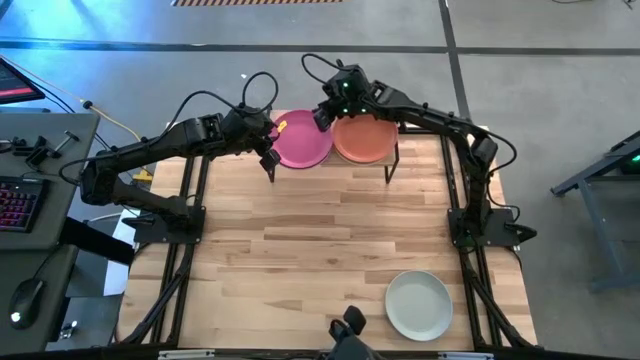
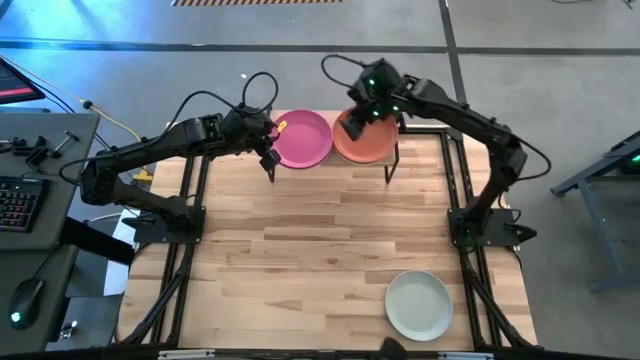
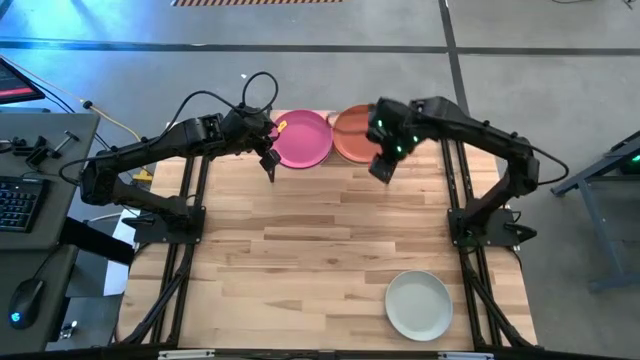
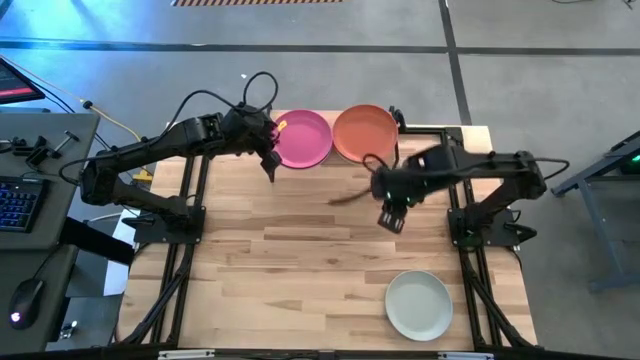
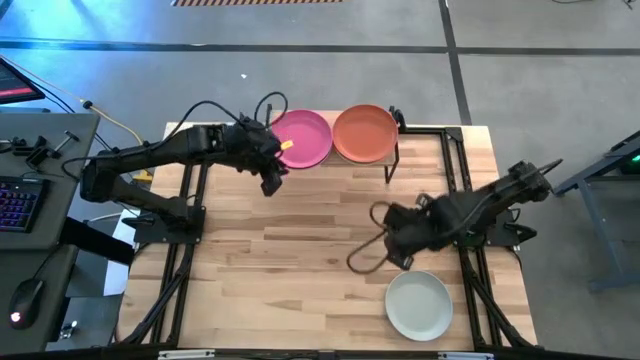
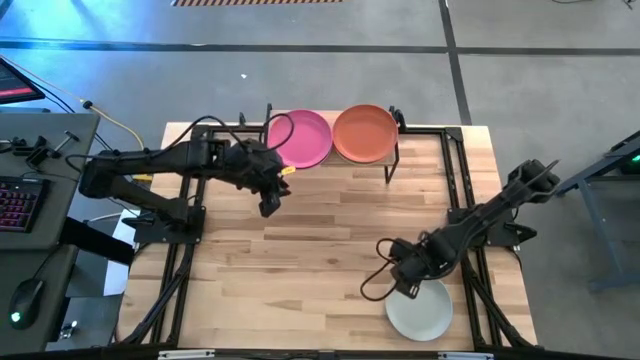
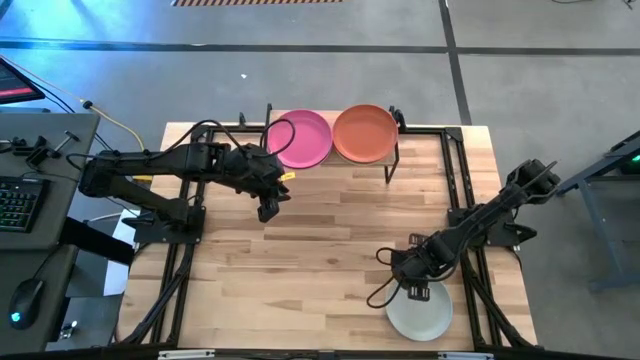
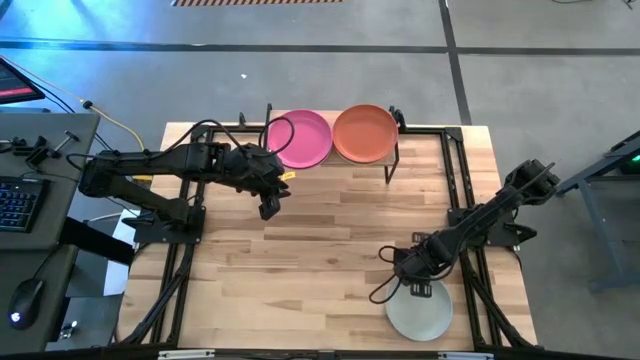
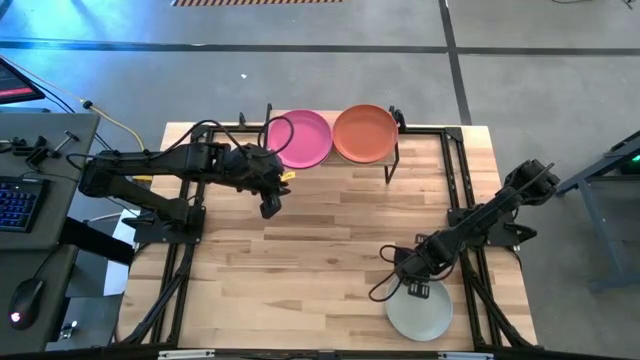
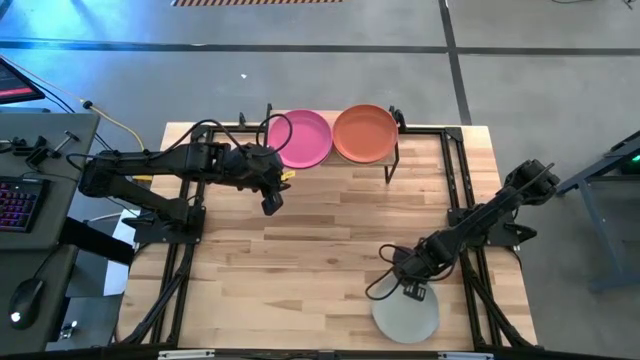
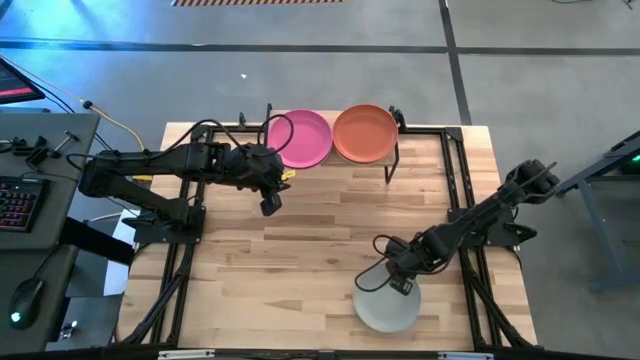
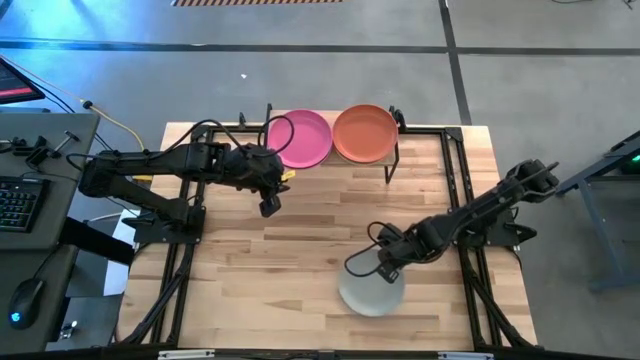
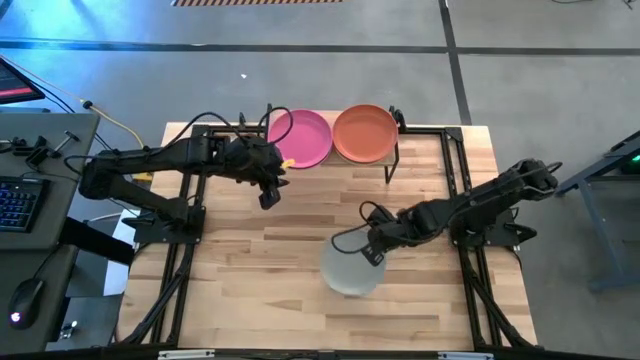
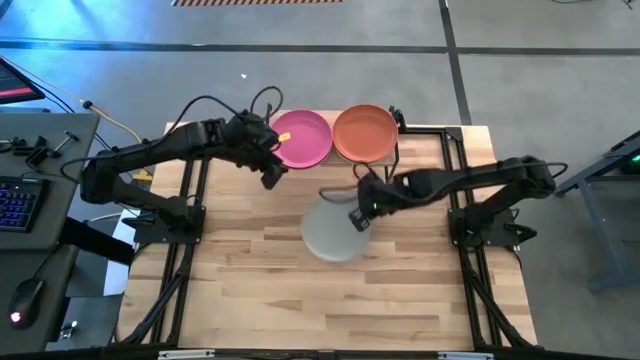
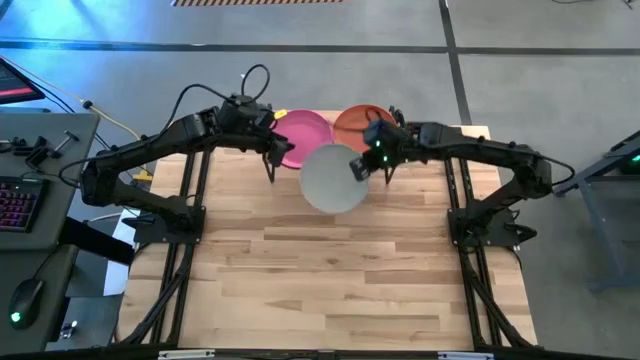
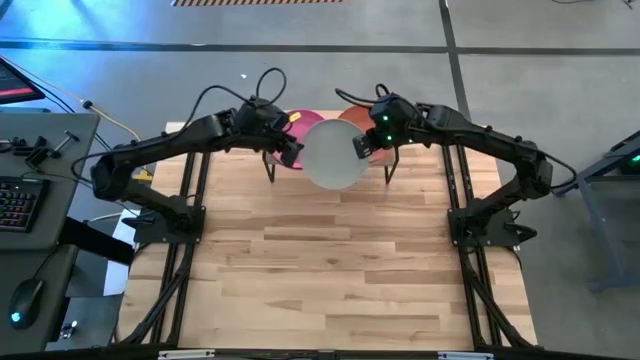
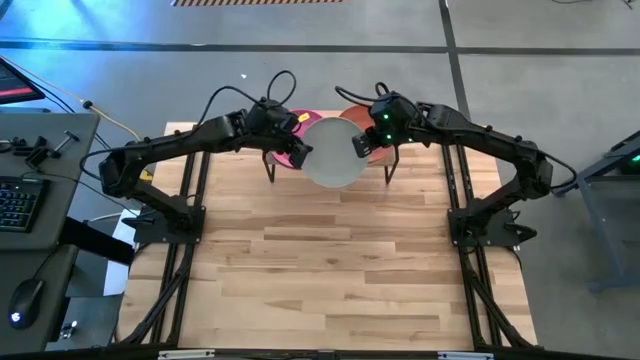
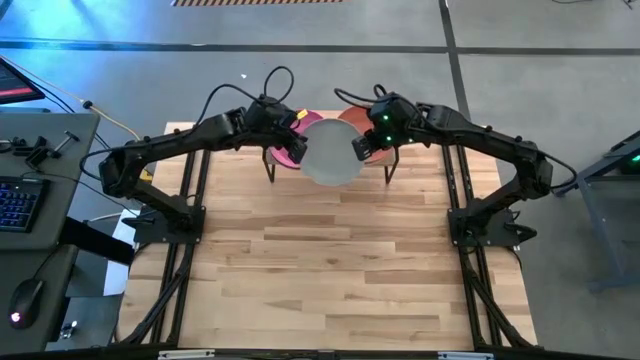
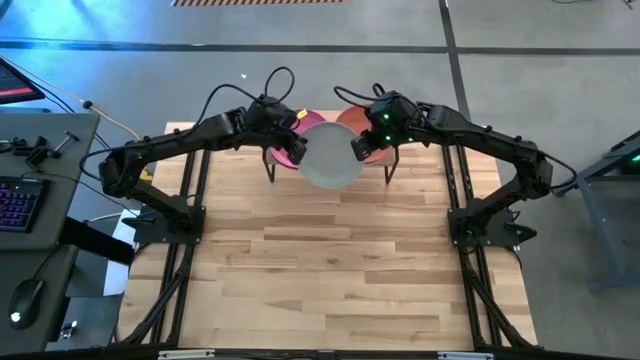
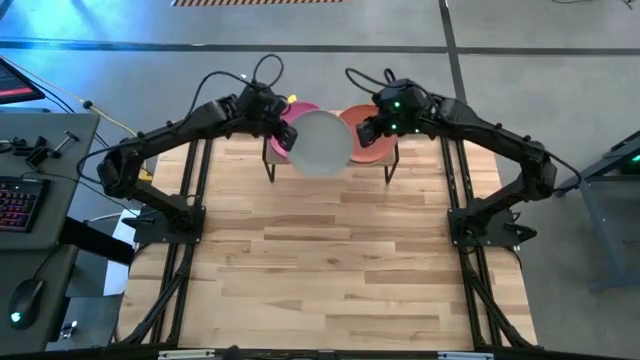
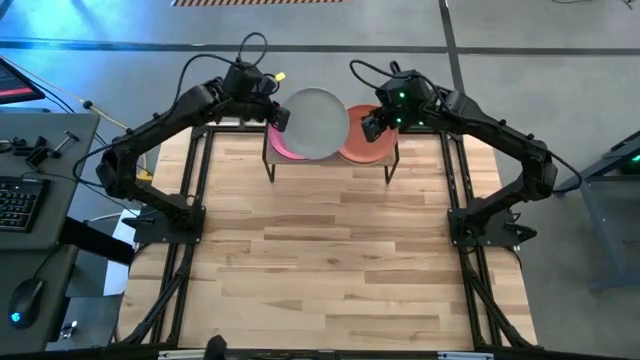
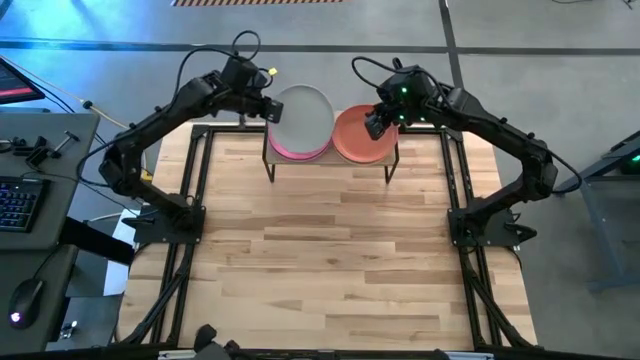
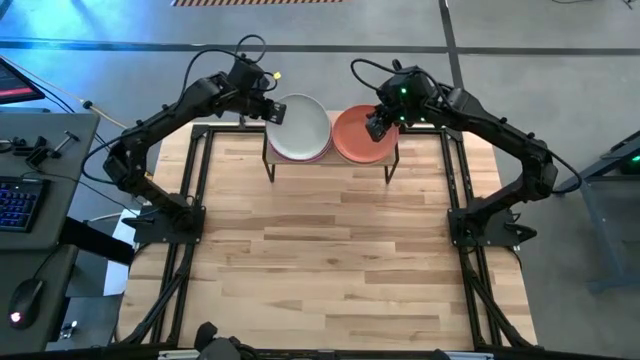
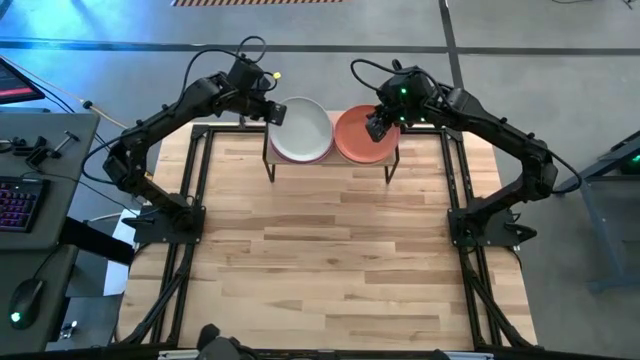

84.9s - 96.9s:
Task: Place and stack plates onto a shelf
Stack the white plate on top of the pink plate on the shelf

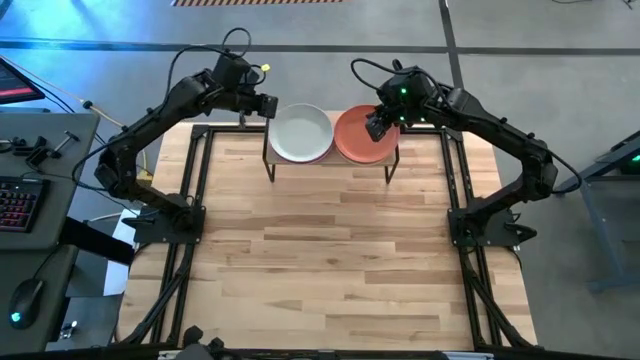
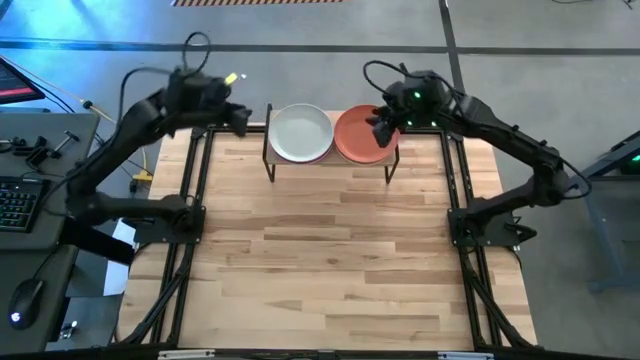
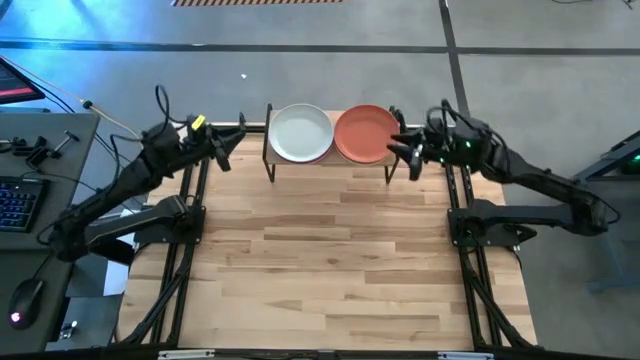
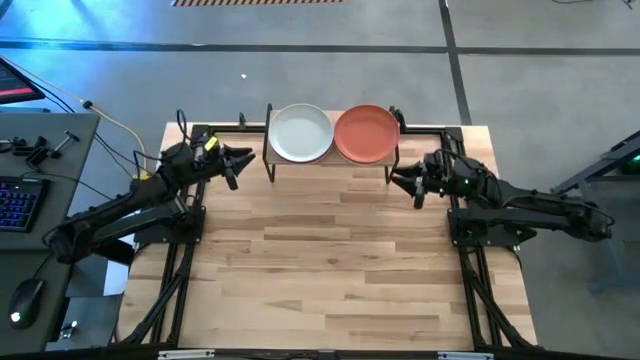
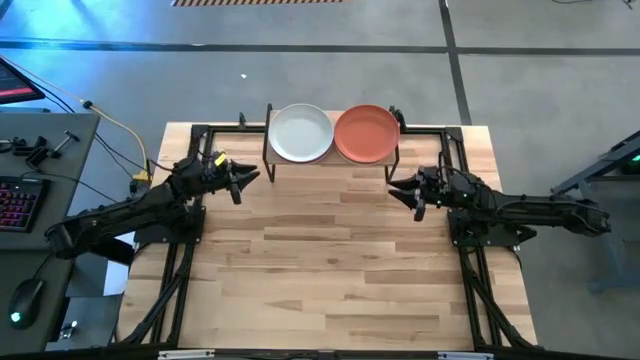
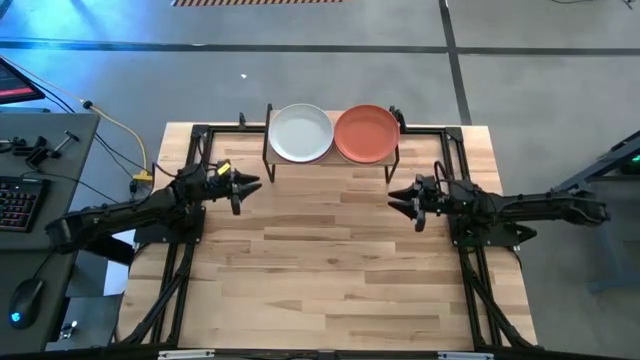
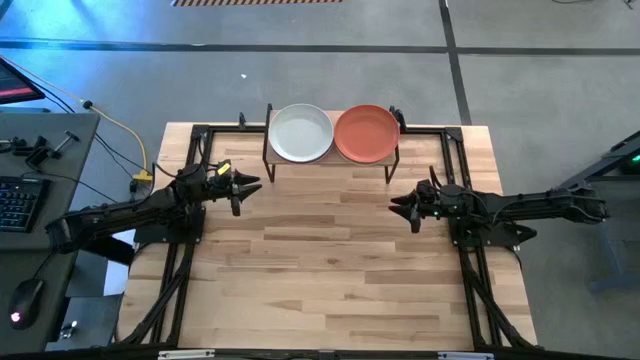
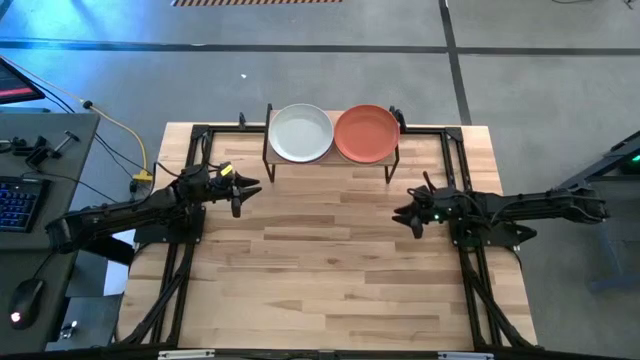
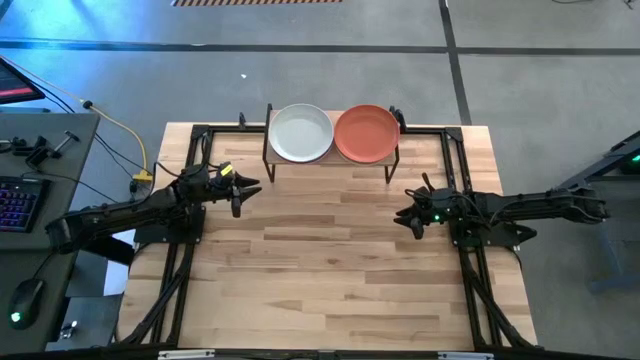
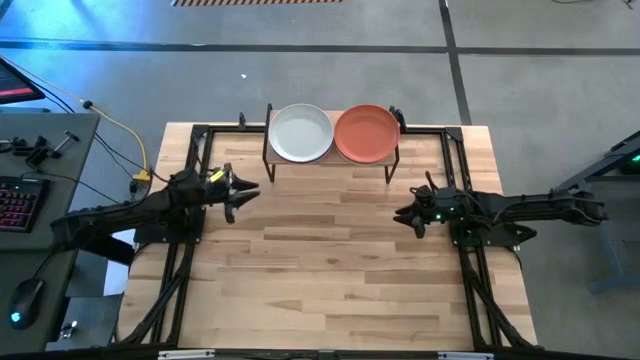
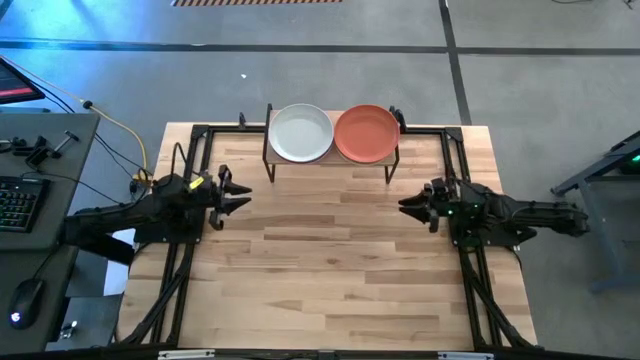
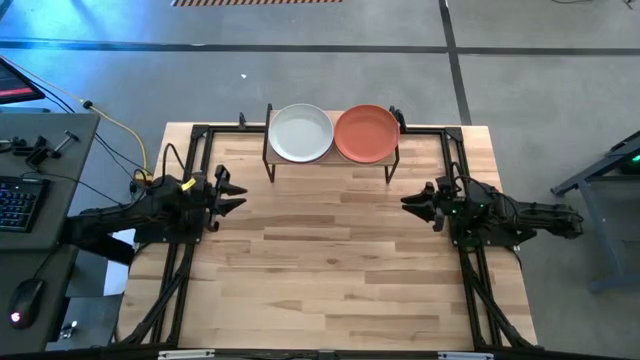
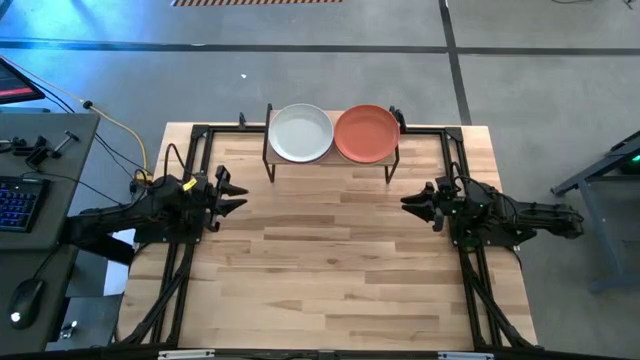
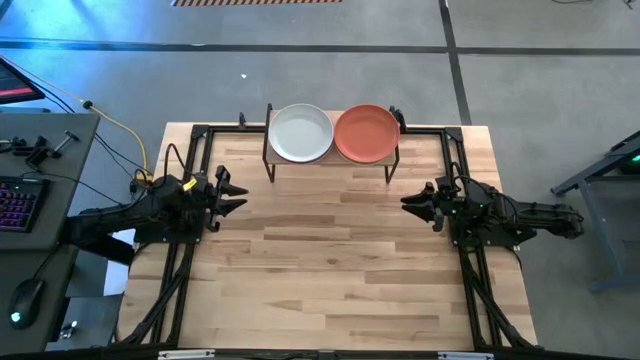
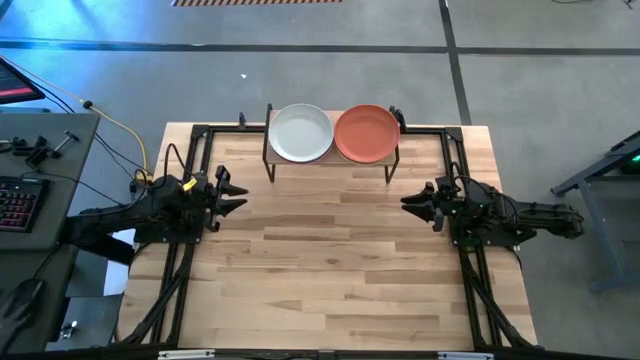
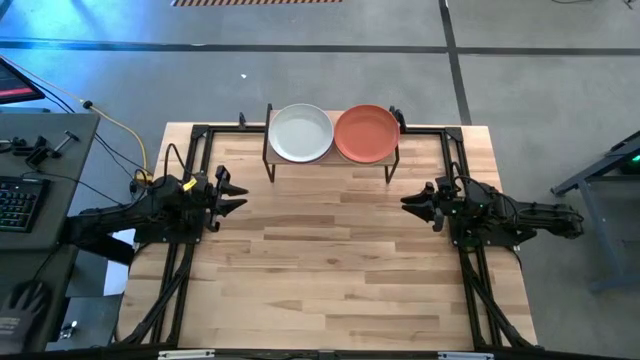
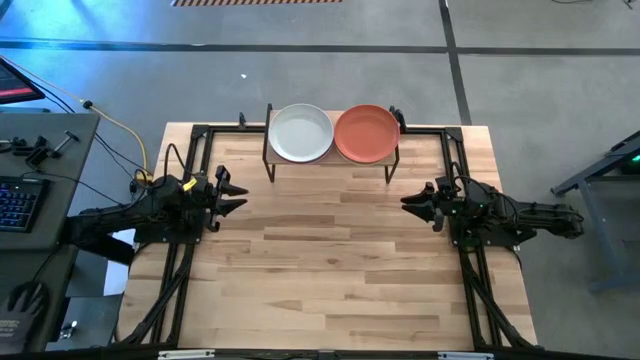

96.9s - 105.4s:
Return to Home Position

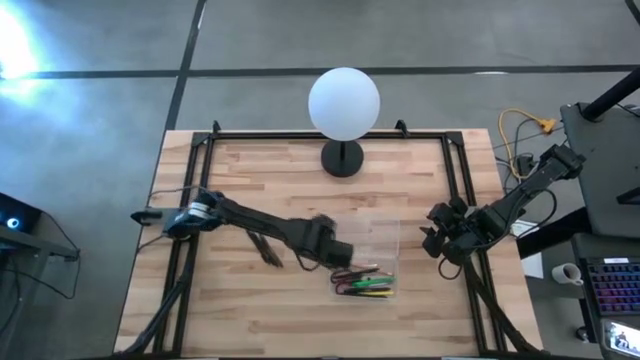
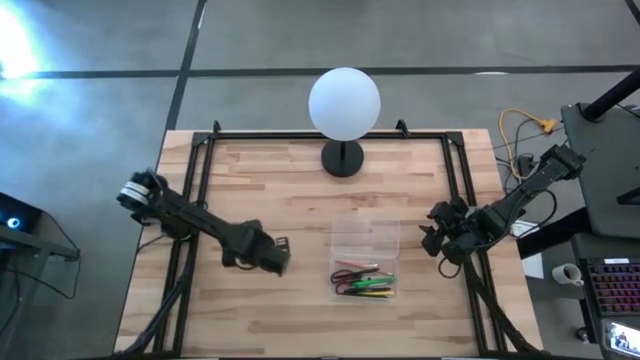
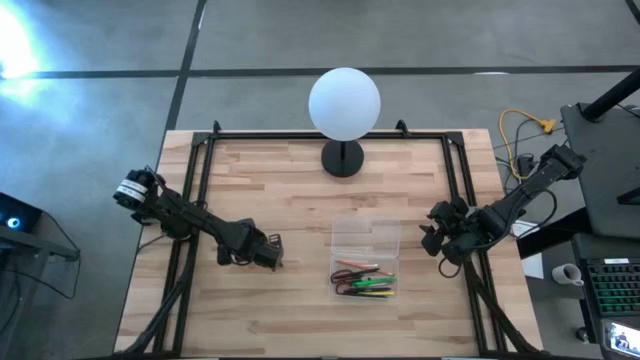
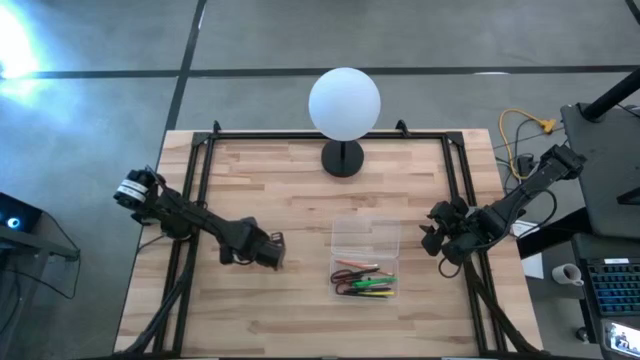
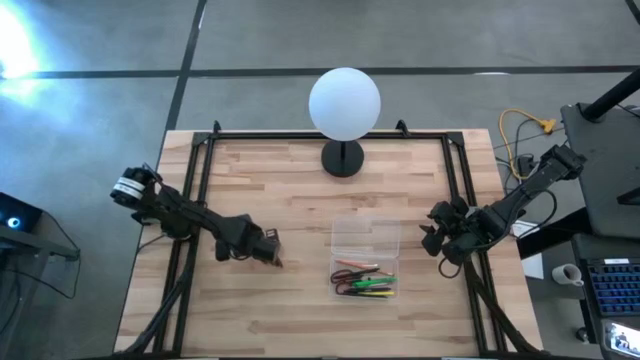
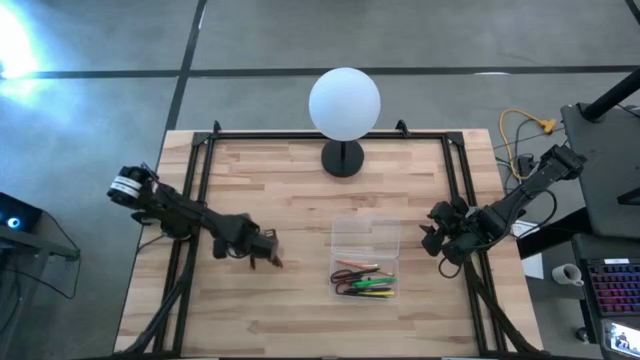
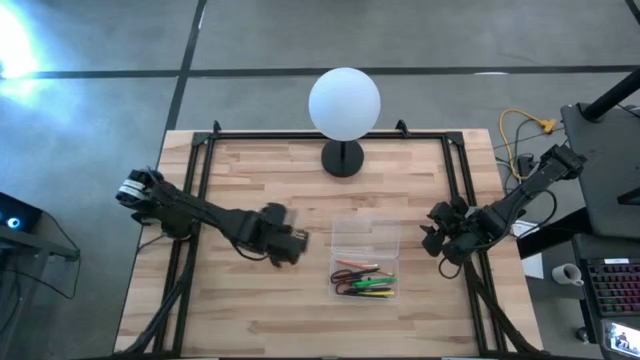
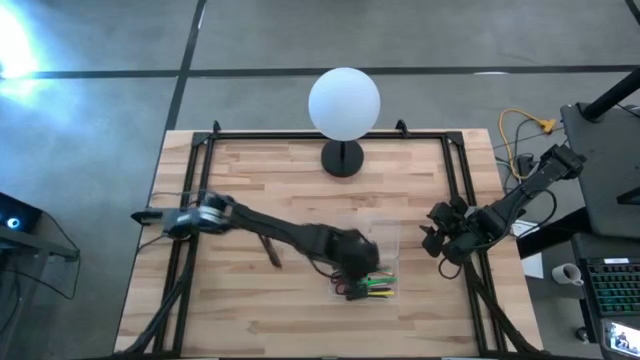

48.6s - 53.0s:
Task: Pick & place school supplies into a supply box
Put the black pen into the transparent supply box
